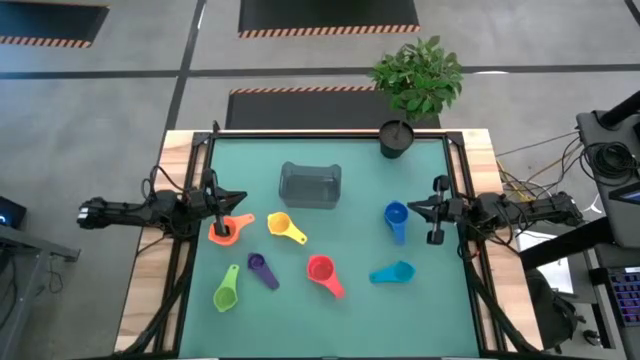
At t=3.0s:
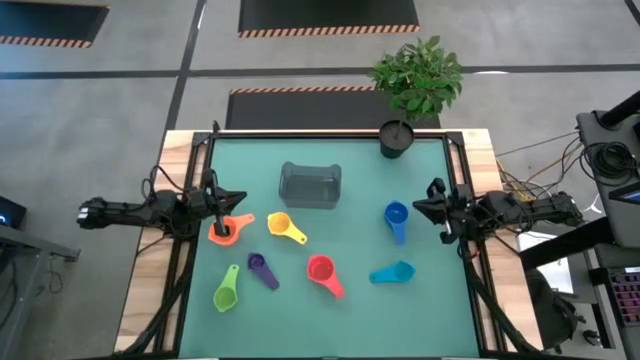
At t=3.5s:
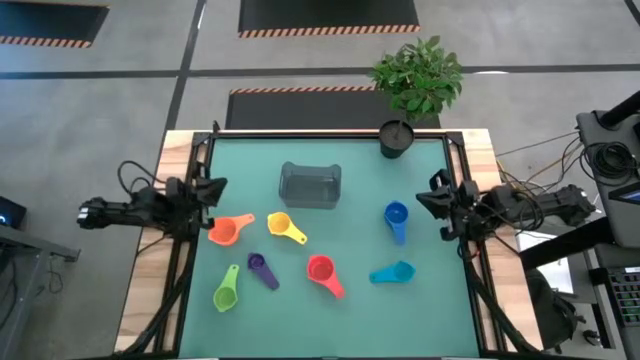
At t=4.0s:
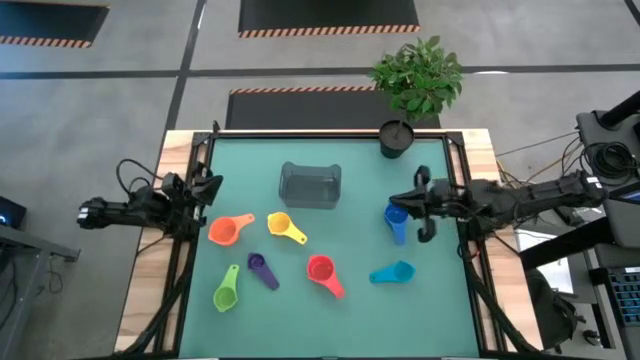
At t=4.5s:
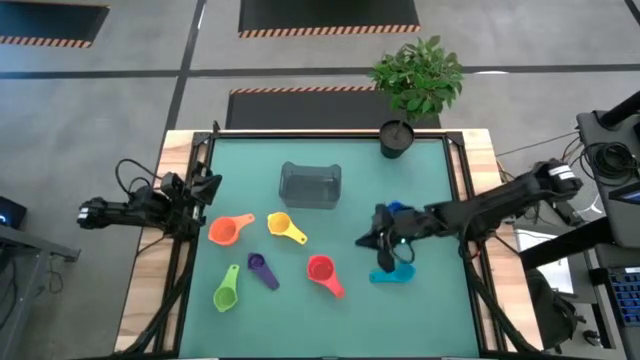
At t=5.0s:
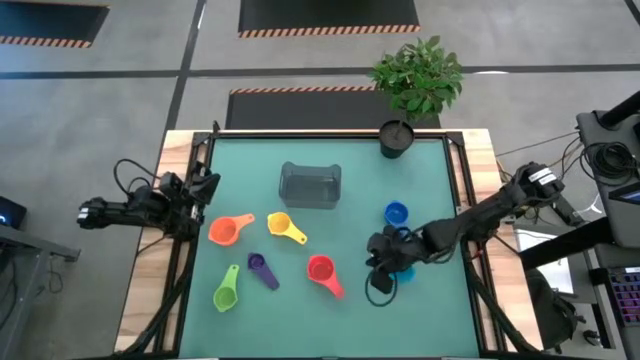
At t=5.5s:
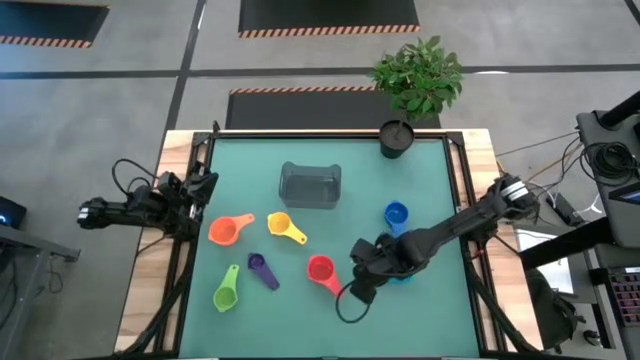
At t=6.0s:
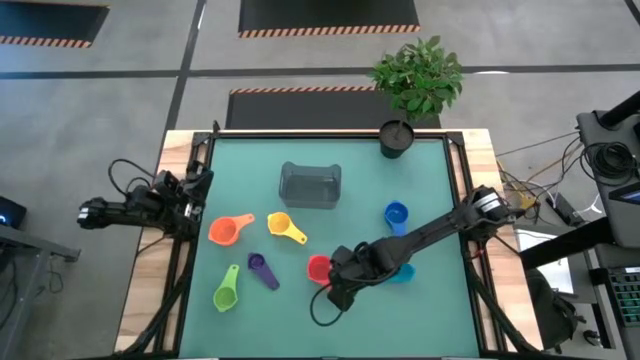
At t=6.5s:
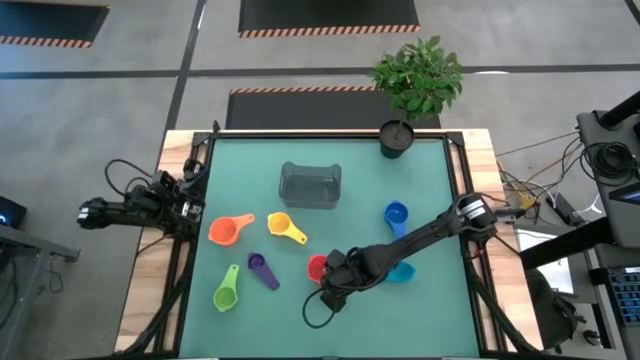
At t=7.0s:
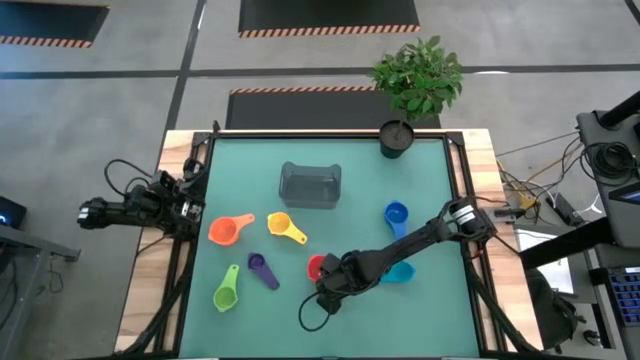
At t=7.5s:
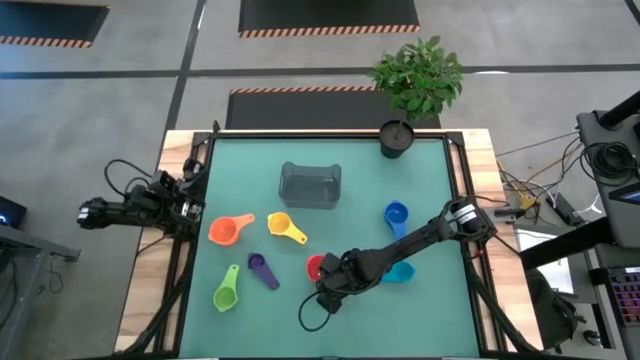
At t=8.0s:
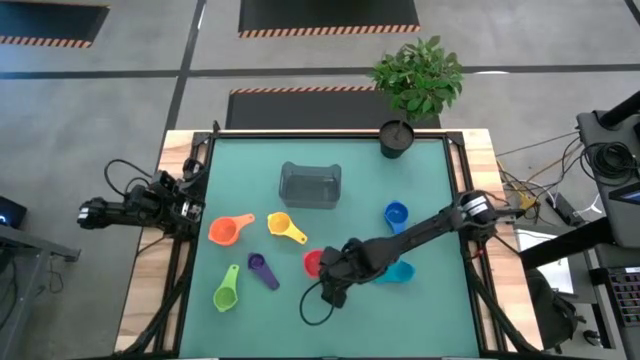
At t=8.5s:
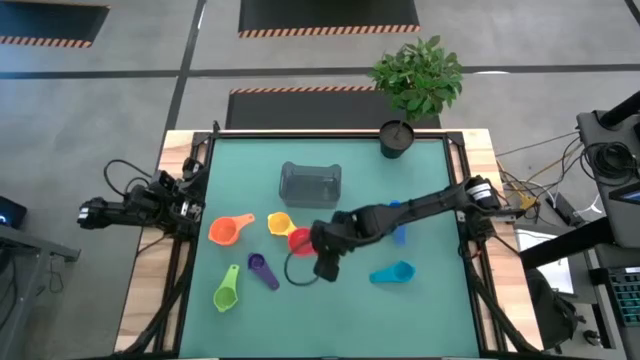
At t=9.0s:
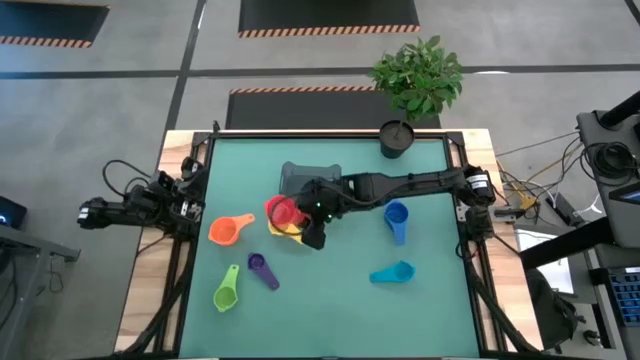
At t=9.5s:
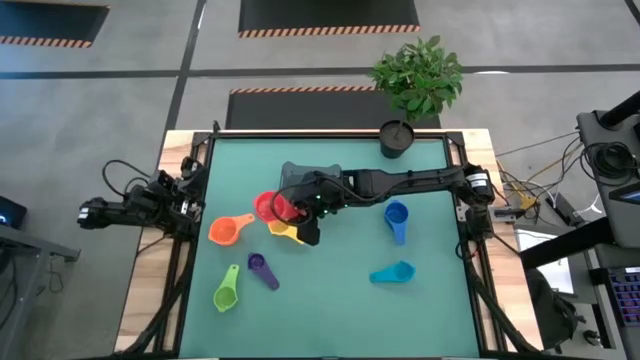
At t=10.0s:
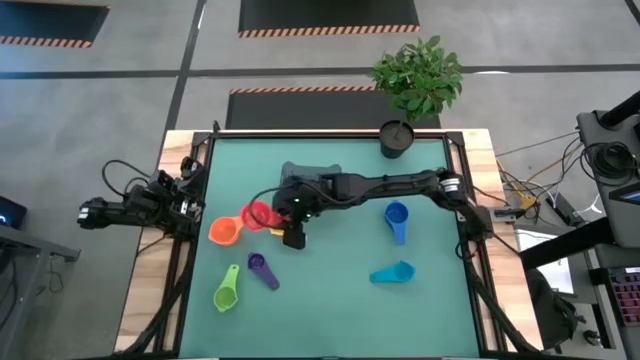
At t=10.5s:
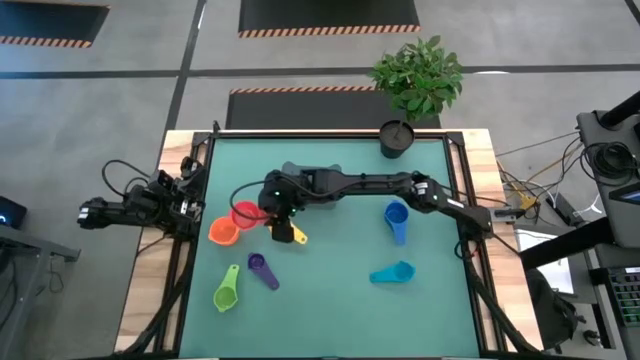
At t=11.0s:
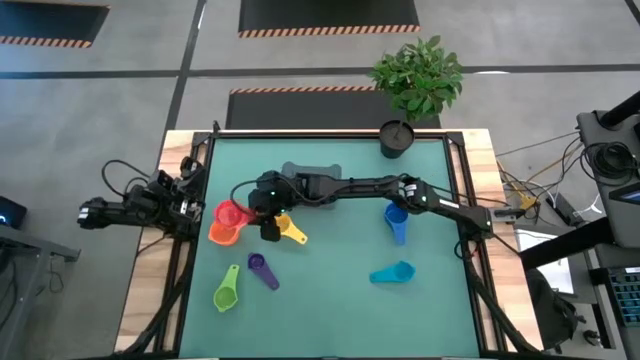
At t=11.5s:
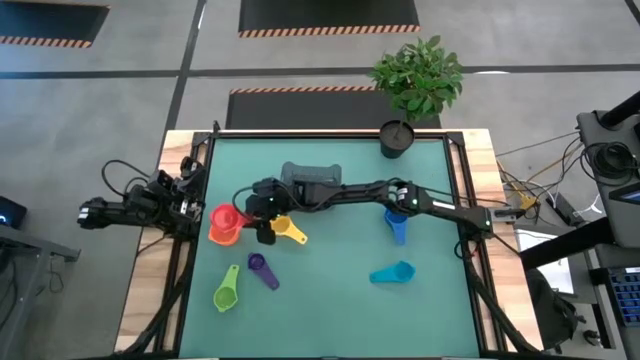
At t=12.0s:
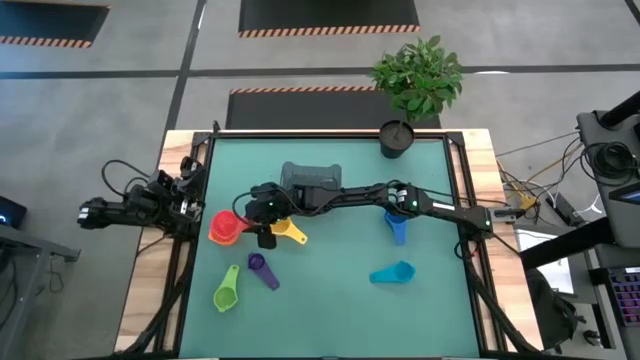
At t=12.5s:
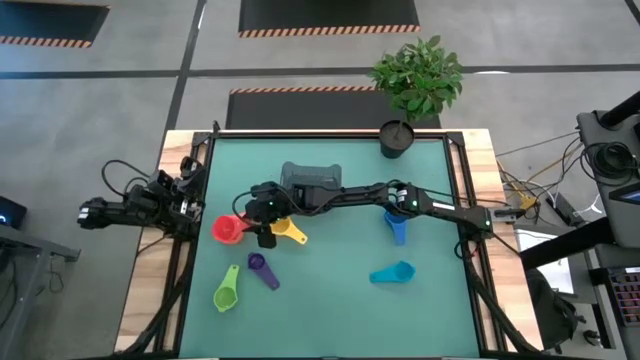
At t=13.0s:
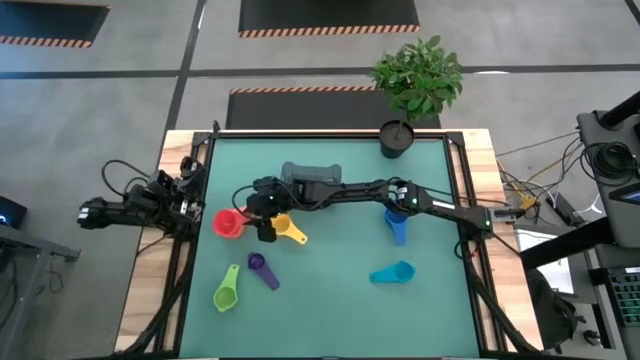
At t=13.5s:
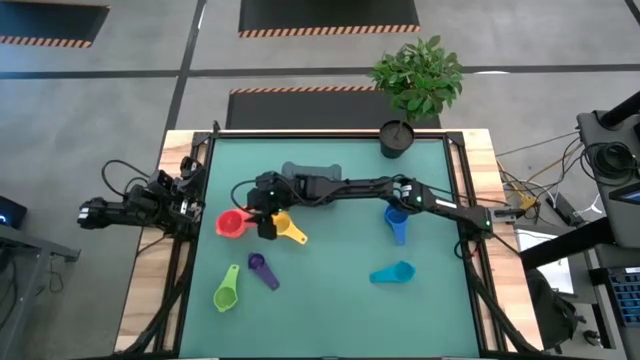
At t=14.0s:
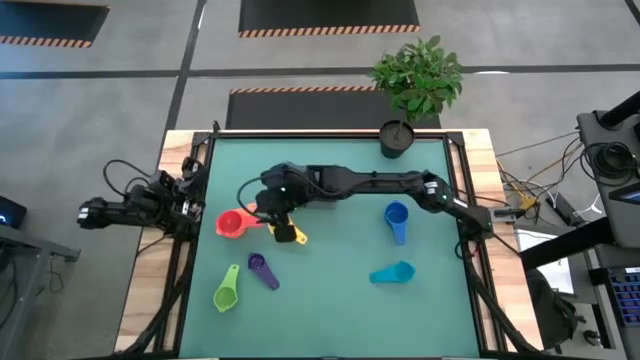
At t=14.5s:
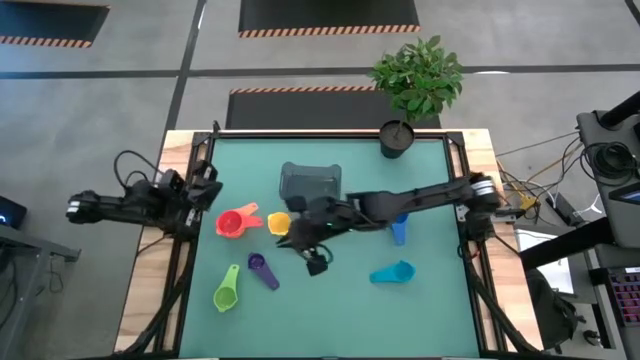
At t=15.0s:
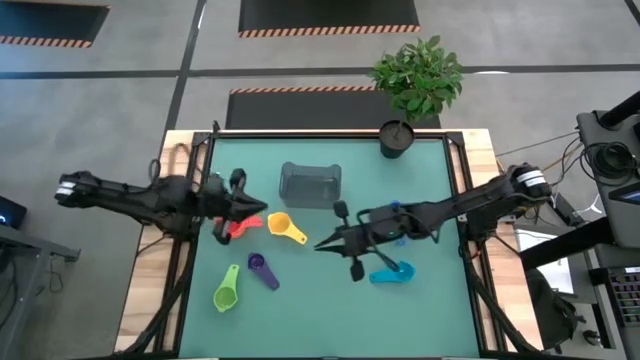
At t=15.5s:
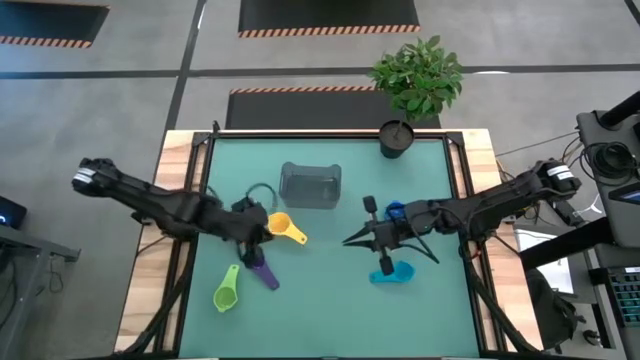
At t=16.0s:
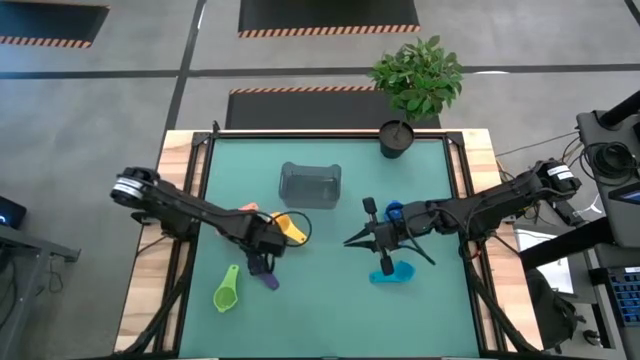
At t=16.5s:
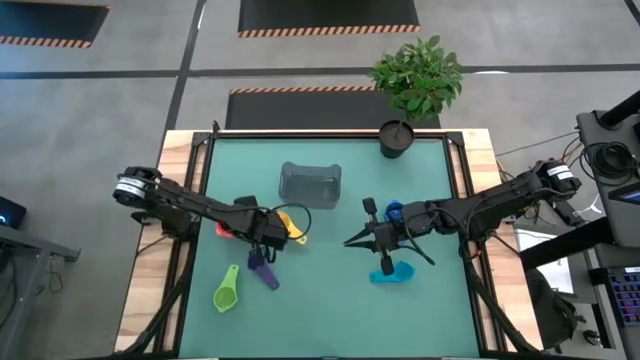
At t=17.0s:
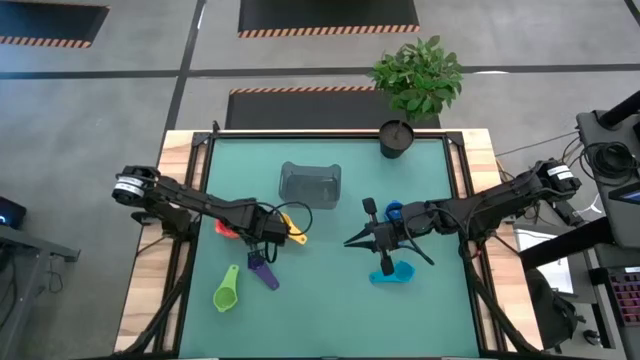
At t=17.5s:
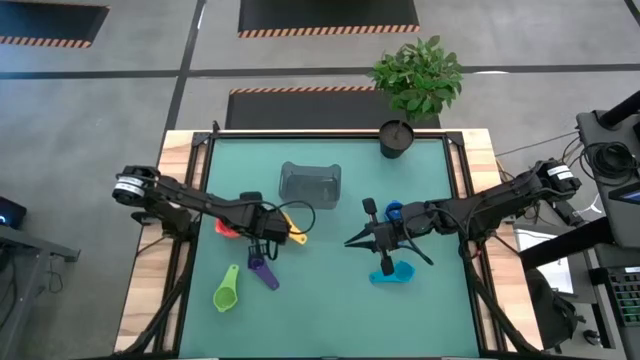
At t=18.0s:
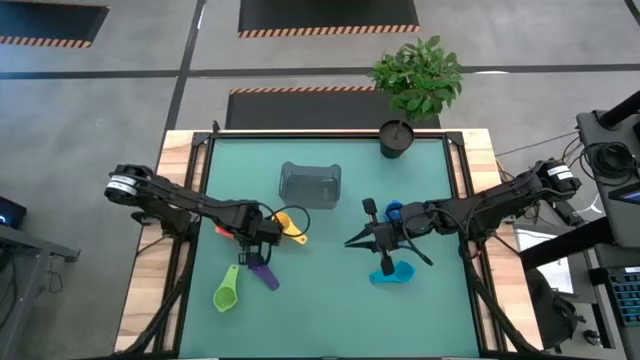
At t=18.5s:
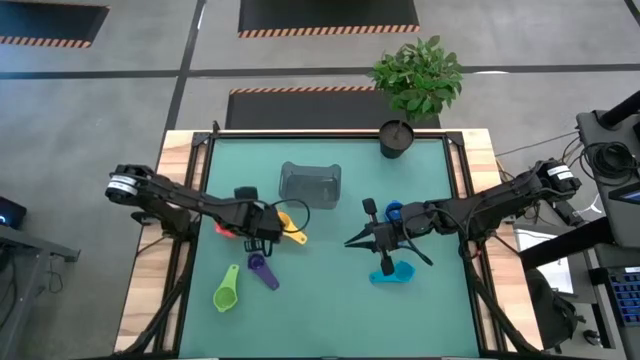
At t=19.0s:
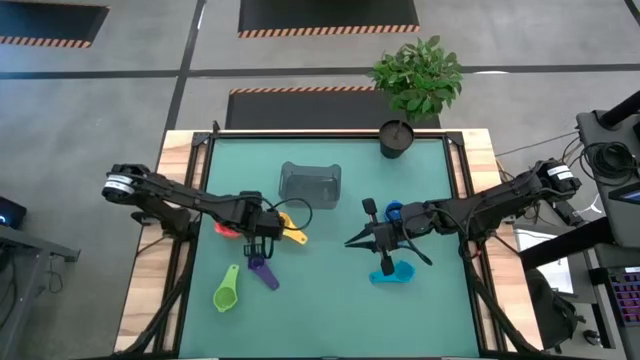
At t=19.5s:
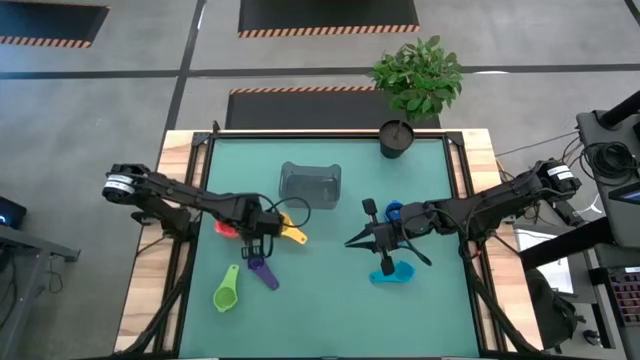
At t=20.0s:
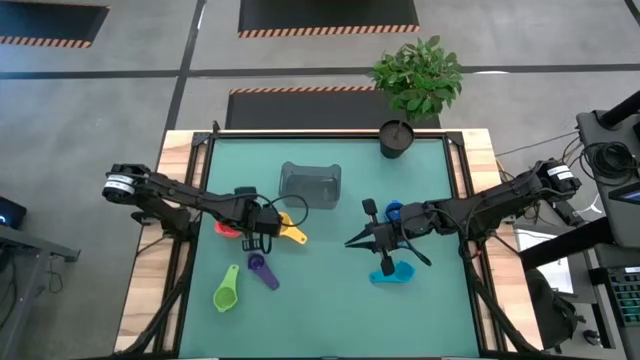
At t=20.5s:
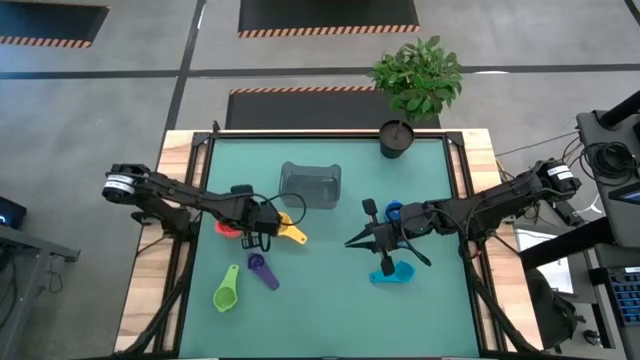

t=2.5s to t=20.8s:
Task: Nest measuring cups in basket
Stack the red measuring cup into the orange measuring cup
